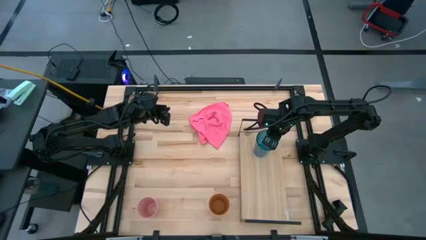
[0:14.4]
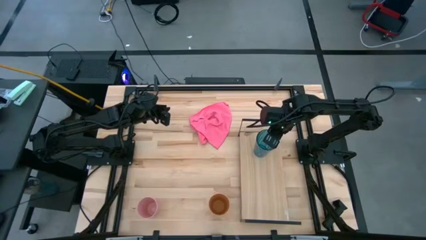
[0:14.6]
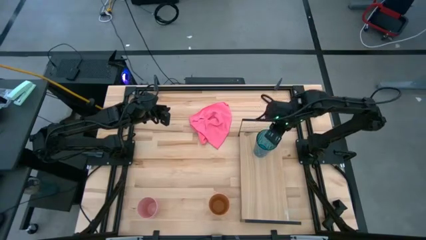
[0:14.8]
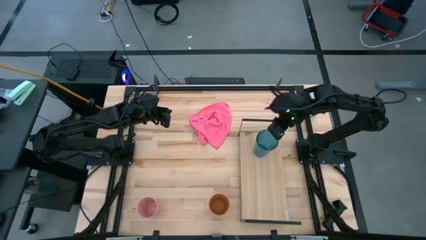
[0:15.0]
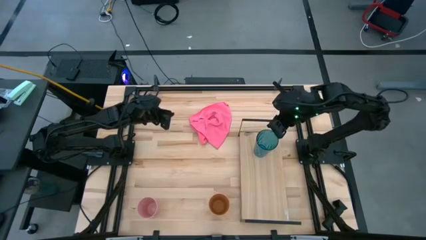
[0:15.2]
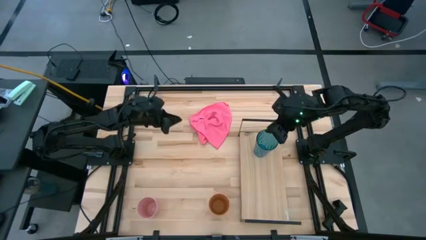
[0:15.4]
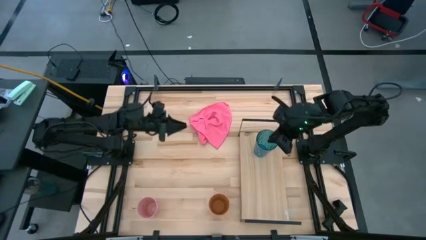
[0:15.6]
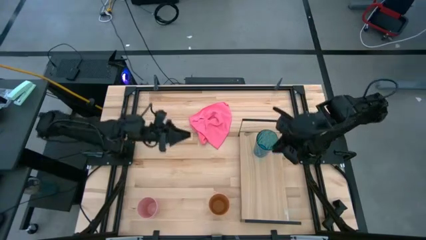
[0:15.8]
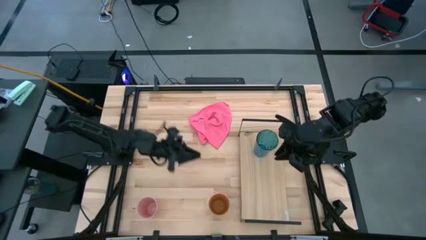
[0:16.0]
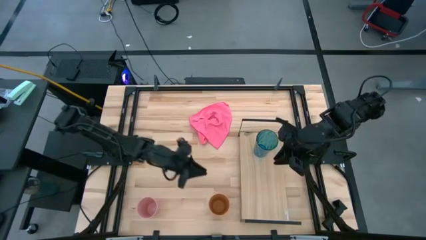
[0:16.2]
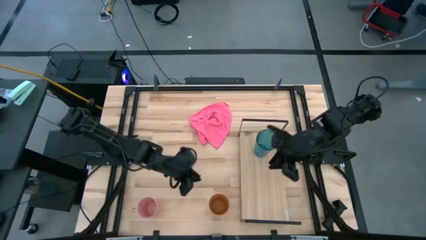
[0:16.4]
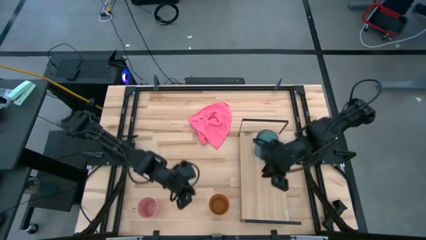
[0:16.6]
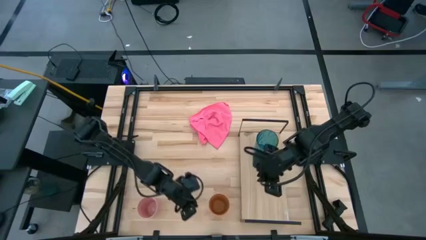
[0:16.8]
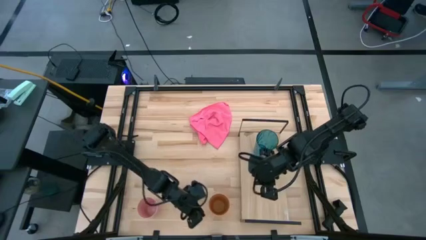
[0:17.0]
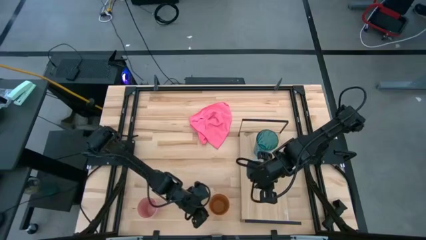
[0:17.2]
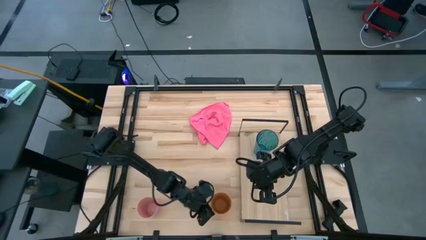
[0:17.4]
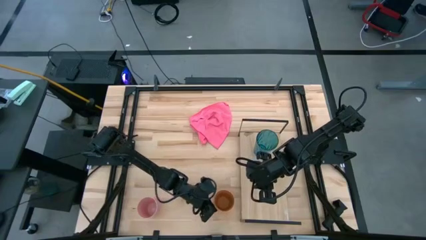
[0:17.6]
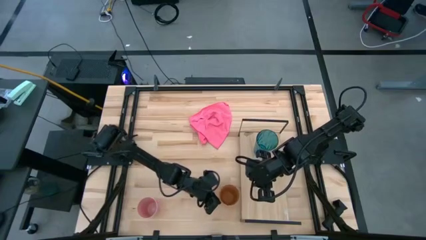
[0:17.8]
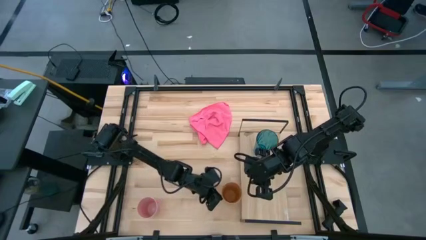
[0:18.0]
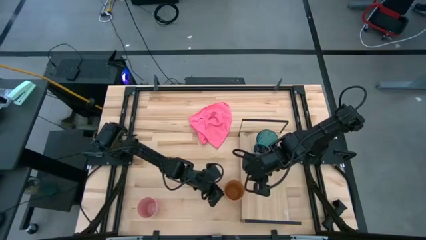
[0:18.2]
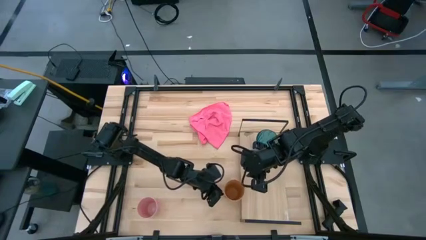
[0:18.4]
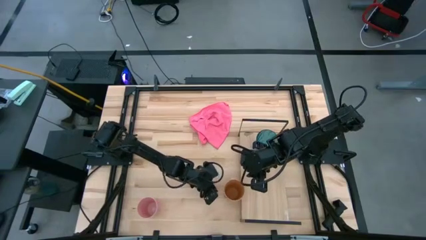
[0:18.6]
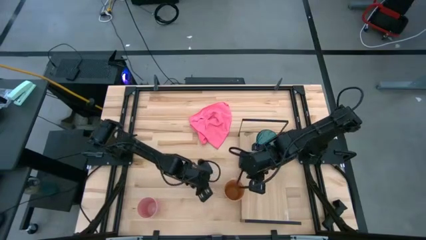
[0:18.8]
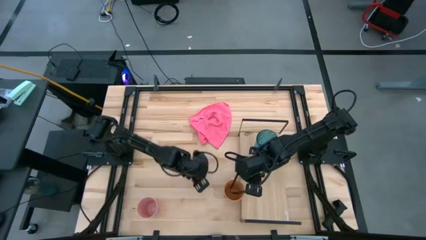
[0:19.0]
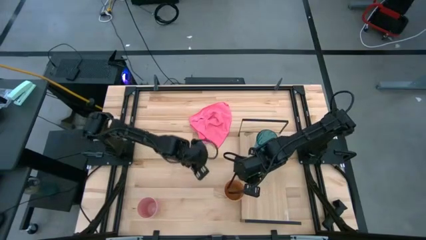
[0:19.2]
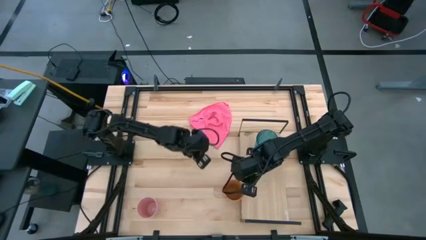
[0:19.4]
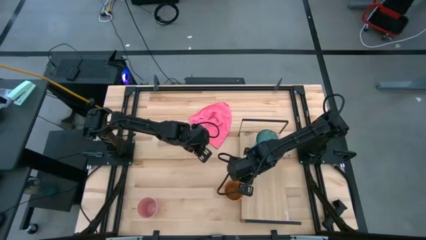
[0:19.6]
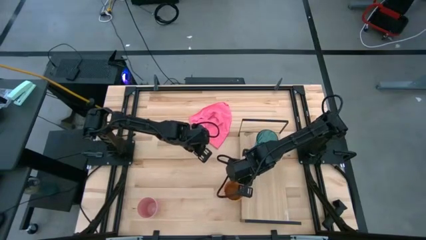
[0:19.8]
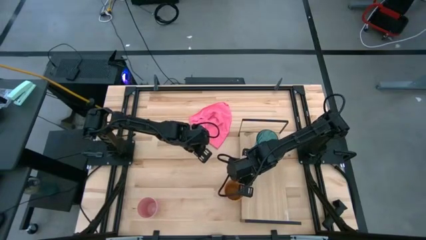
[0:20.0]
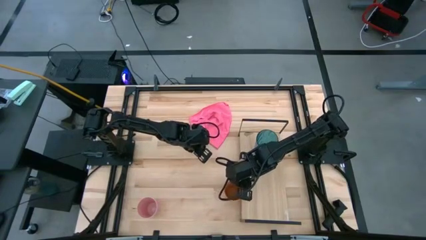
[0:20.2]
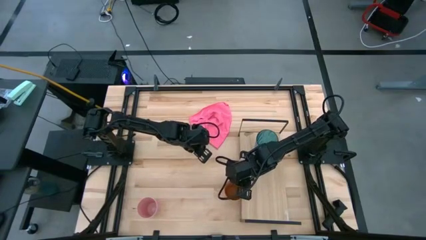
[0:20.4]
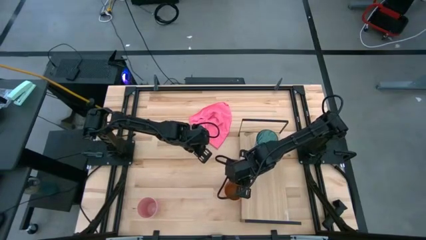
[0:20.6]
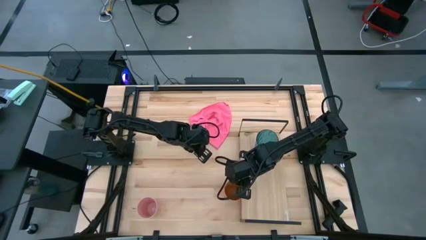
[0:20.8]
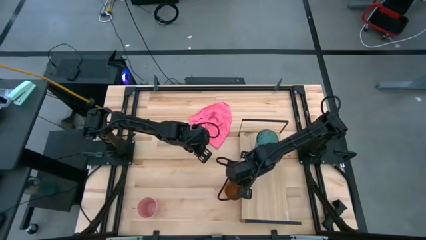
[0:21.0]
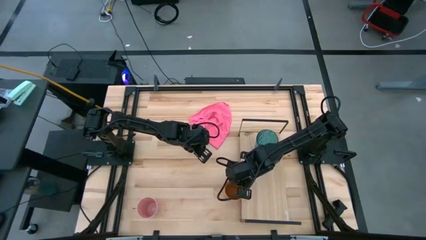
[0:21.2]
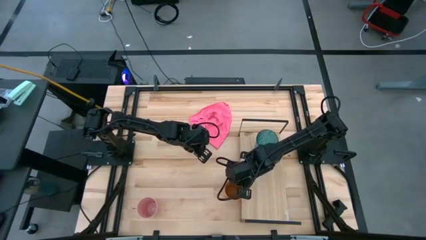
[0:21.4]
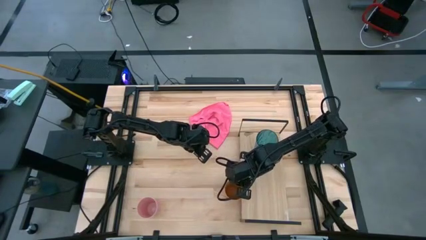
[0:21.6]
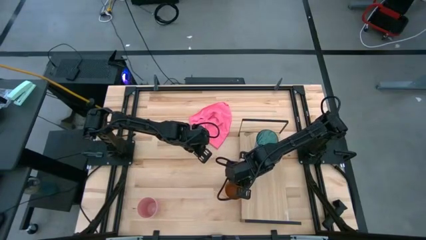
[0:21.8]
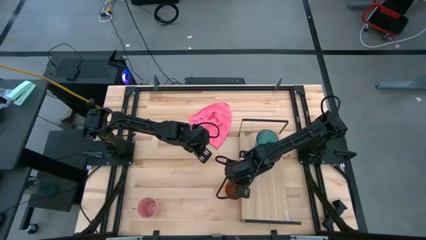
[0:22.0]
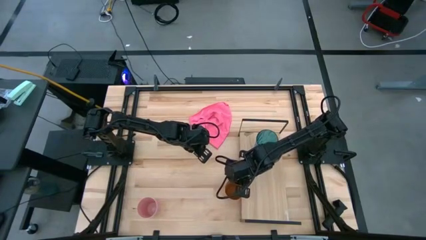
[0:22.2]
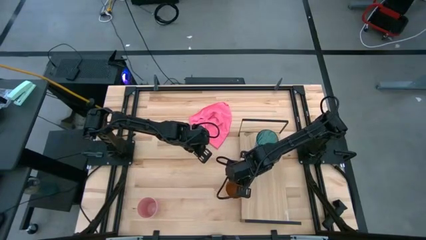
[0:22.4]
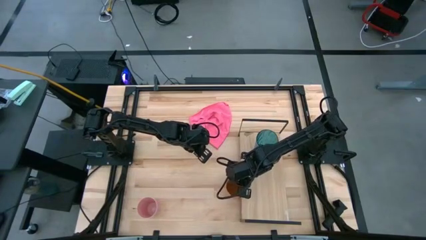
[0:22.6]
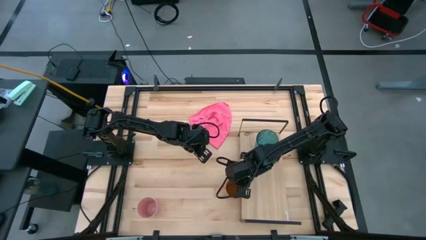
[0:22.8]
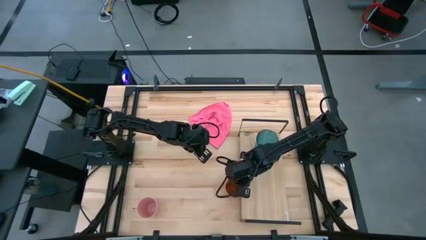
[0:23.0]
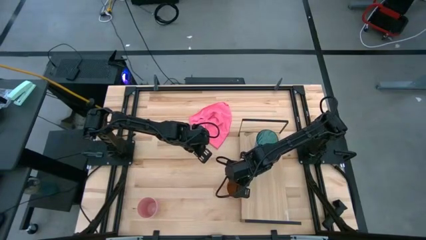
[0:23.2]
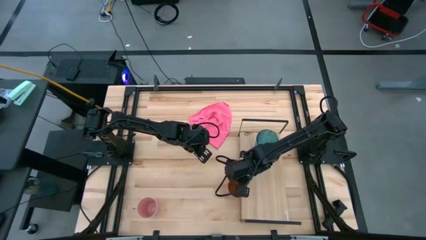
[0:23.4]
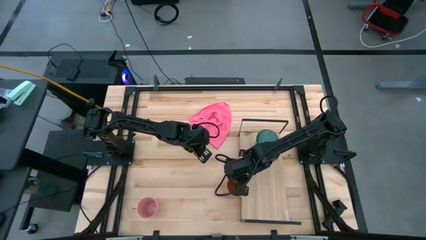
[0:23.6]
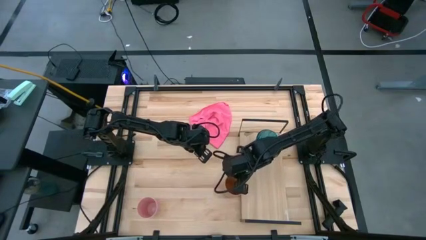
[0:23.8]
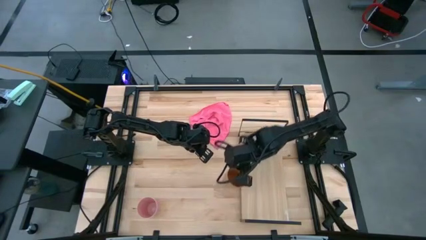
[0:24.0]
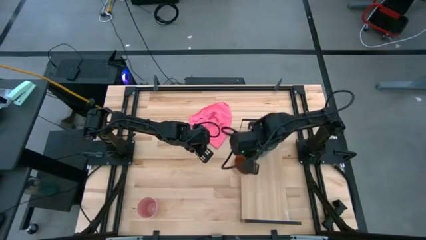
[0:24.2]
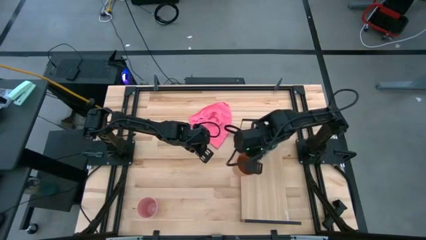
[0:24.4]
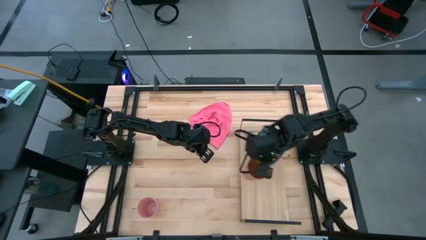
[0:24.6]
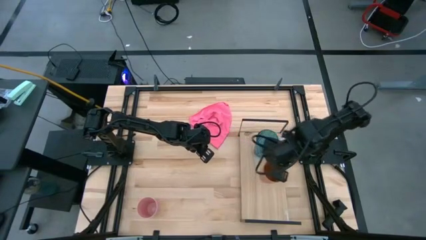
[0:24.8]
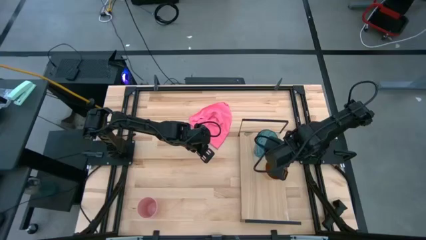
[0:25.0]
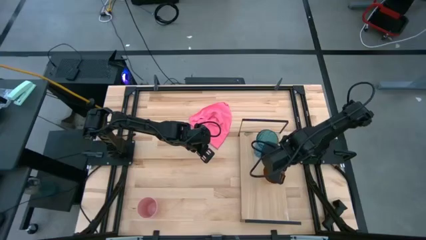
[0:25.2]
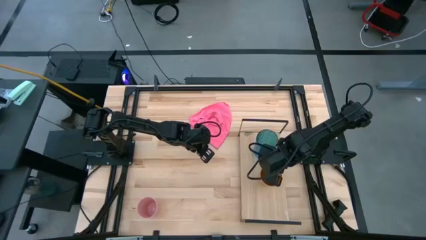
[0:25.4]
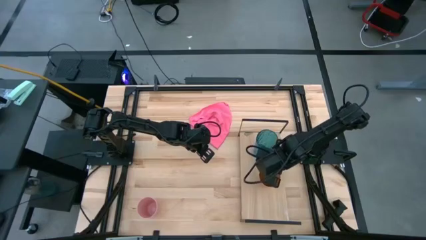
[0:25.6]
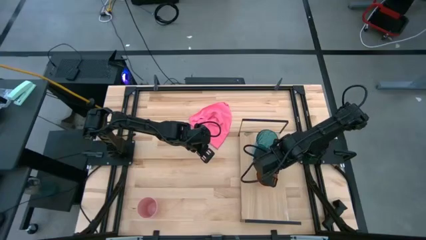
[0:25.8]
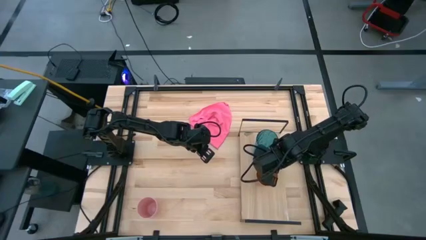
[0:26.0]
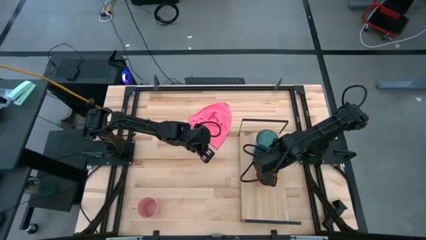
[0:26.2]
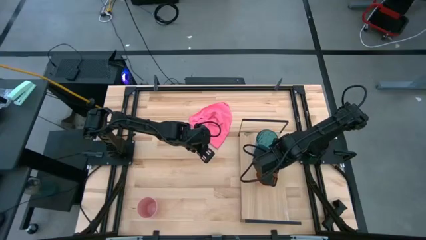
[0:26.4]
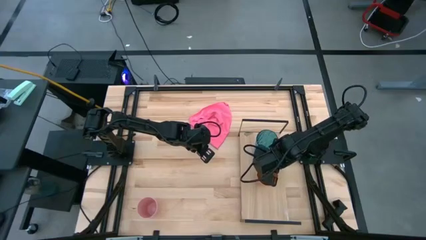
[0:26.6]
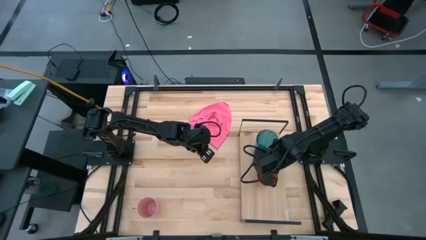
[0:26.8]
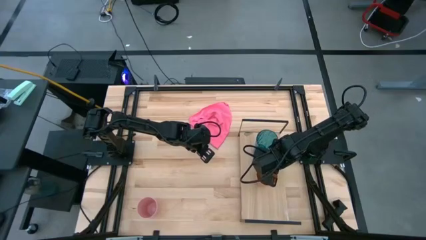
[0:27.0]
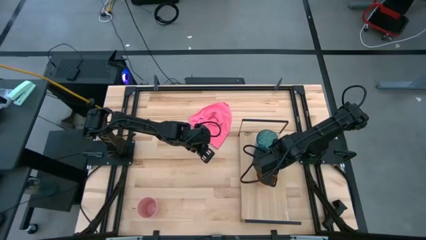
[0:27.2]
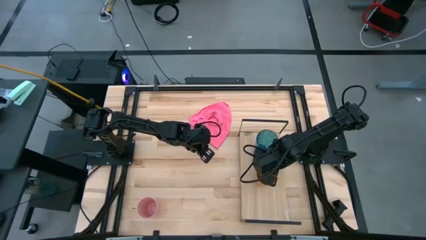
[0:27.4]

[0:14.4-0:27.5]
Task: Stack small to large cups/mugs on shelf
Put the yellow cup on the shelf
